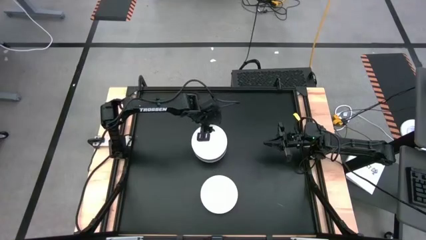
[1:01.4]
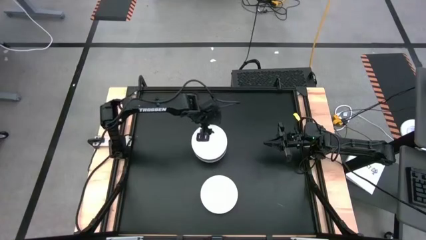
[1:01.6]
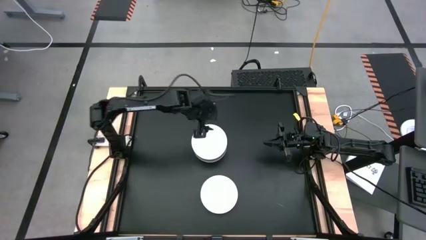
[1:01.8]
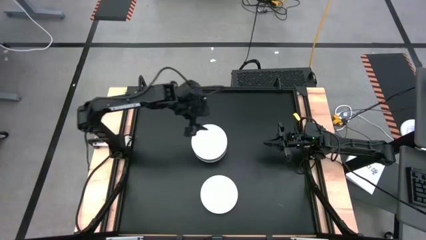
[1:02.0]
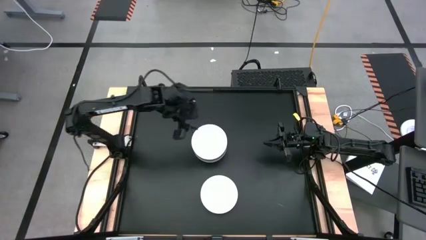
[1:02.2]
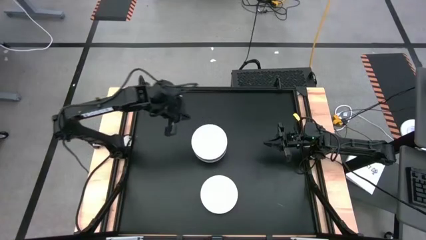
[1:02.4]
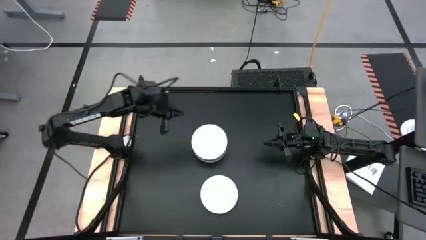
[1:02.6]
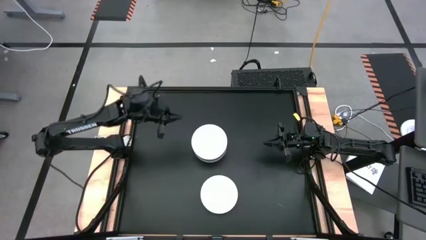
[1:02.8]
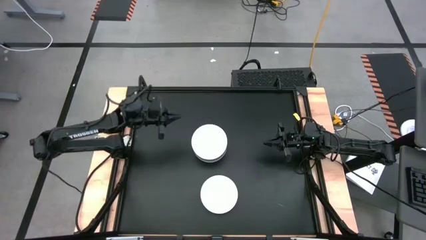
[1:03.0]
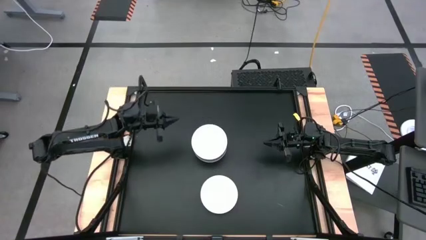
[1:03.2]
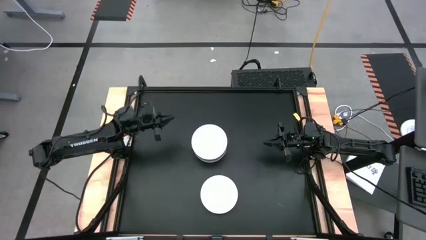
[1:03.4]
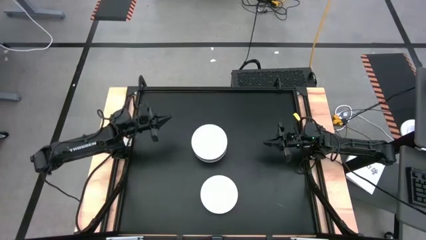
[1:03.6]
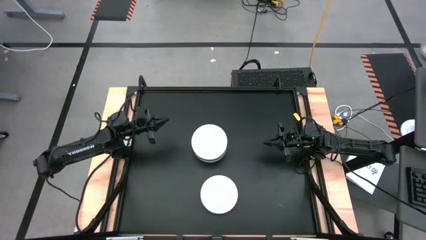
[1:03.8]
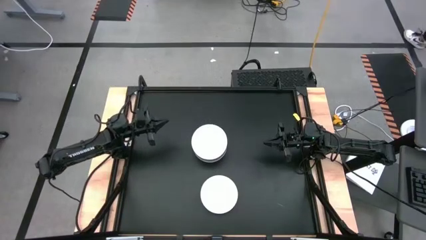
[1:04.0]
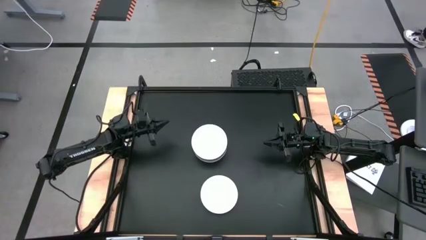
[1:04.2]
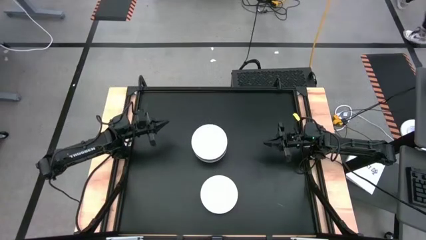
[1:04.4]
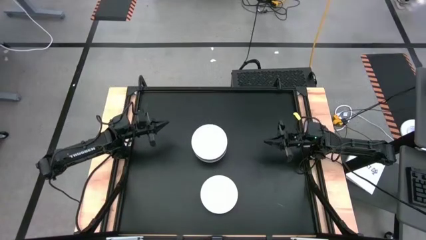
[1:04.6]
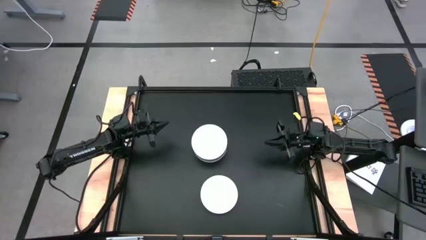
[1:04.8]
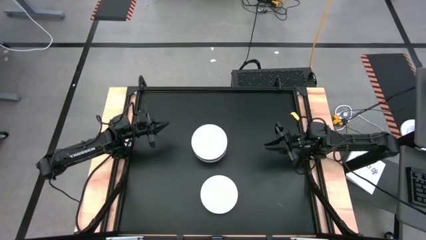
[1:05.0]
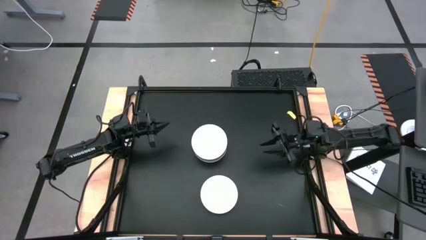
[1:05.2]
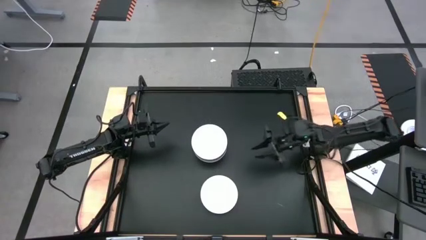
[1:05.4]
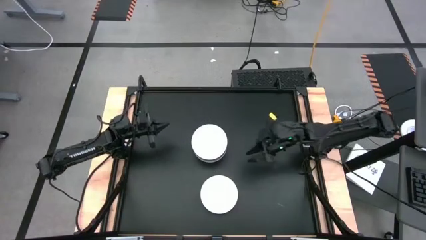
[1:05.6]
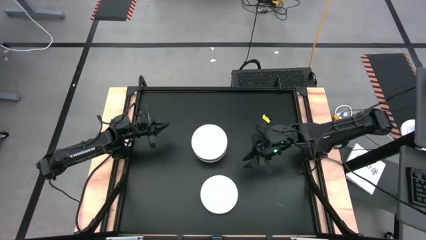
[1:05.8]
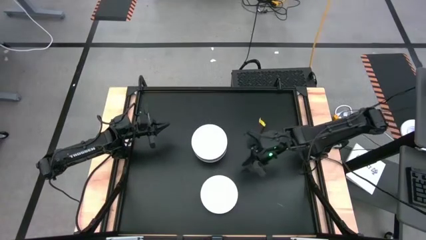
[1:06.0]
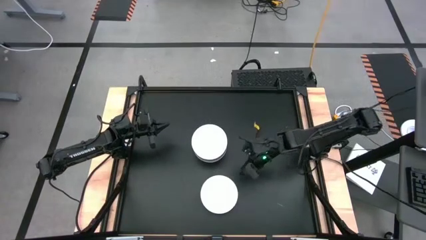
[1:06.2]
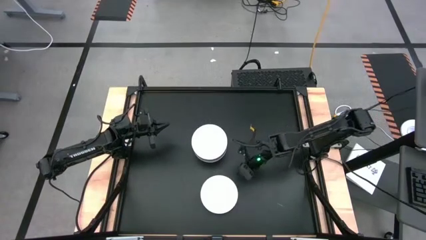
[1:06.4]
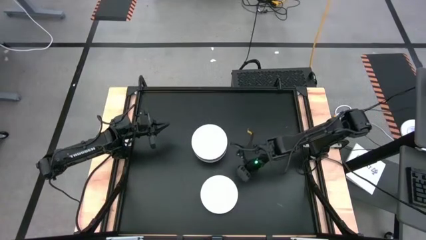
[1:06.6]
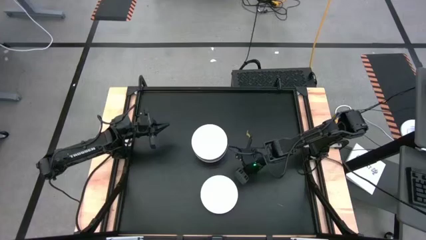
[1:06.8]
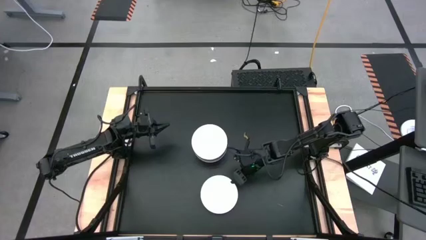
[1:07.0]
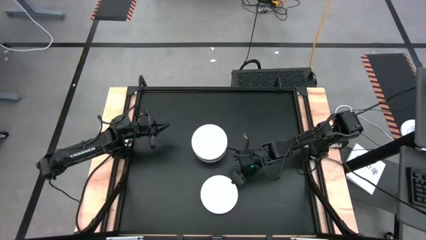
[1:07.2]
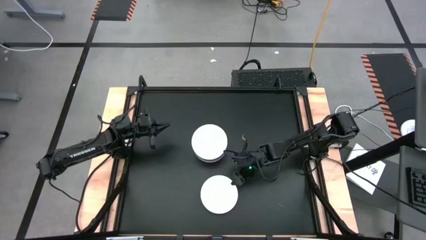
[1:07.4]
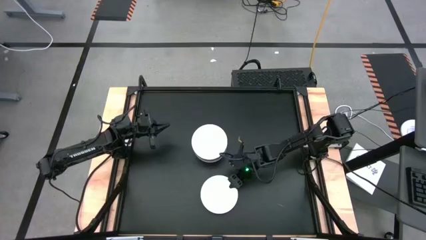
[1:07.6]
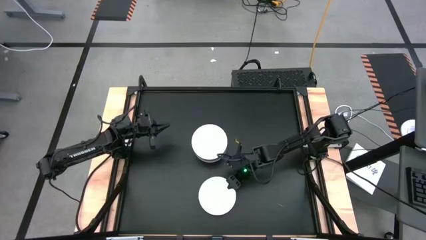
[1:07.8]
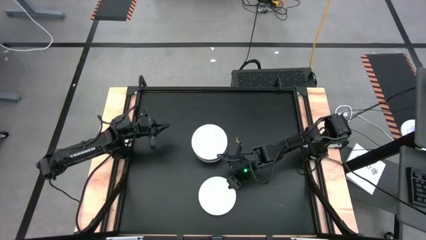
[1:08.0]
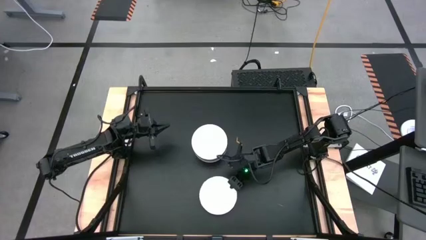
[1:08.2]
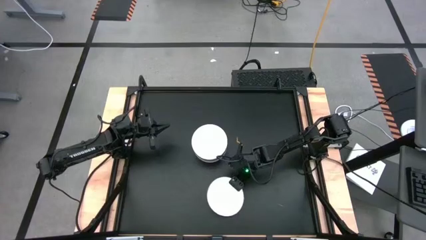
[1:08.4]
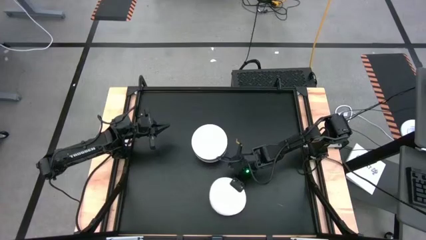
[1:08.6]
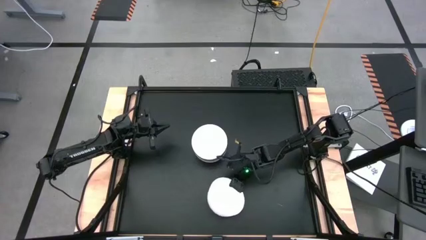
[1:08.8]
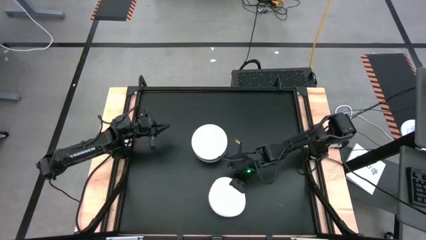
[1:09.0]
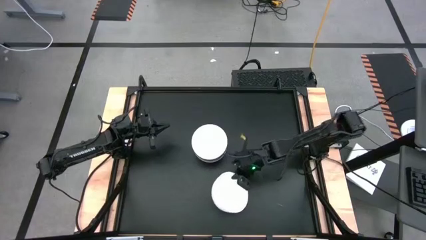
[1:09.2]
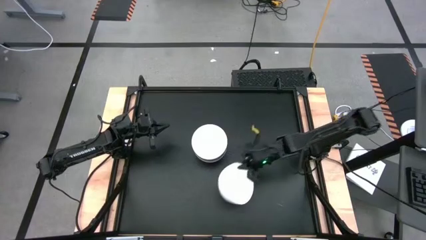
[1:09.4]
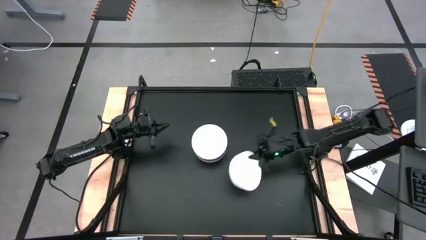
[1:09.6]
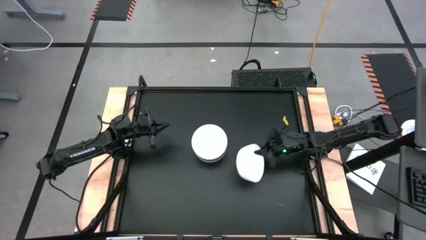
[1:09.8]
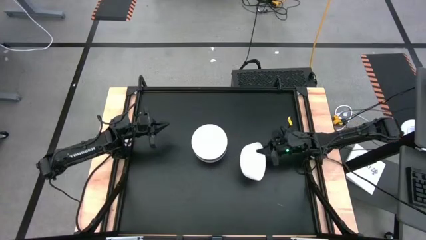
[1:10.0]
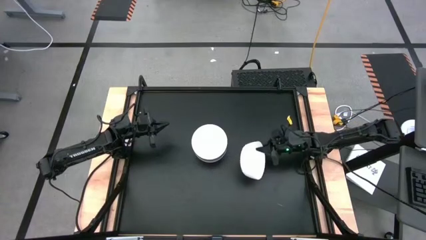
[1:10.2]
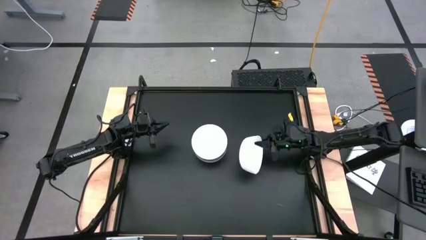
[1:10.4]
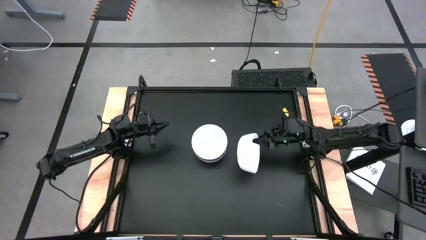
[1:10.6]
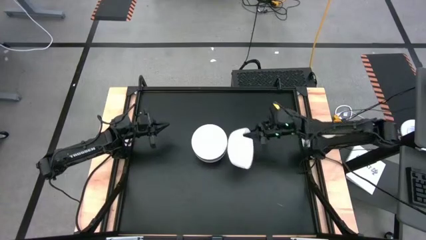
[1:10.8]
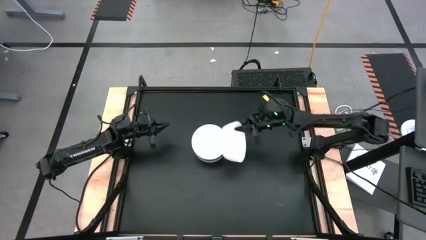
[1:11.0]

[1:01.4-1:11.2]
Task: Nest bowls inside each other
Stack the white bowl on top of the stacked white bowl

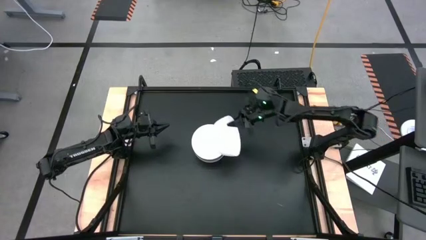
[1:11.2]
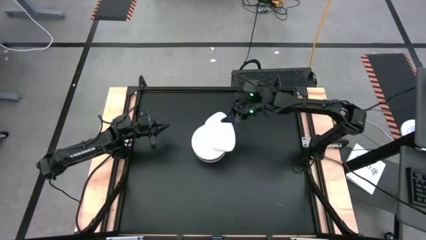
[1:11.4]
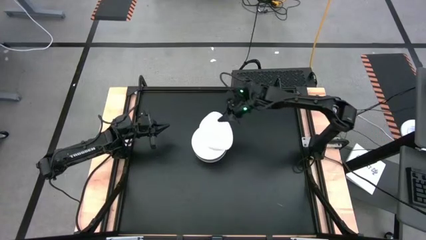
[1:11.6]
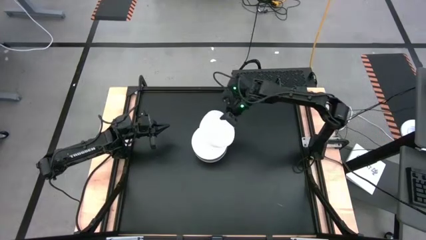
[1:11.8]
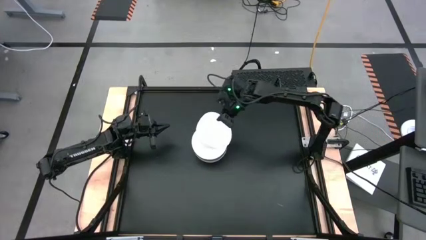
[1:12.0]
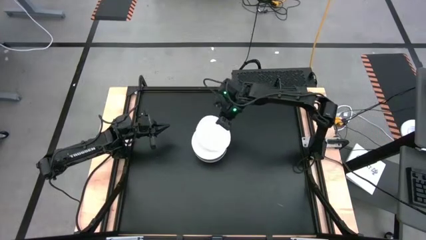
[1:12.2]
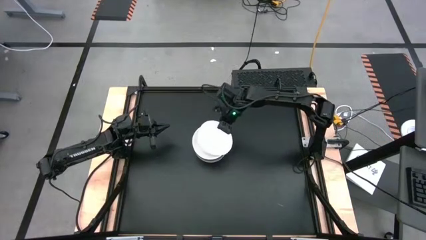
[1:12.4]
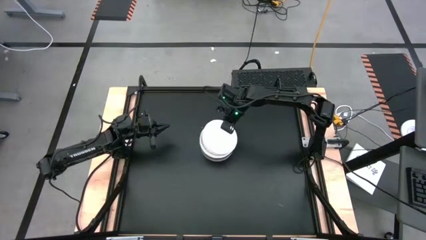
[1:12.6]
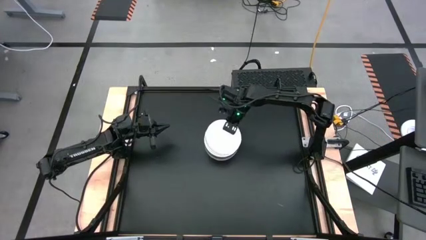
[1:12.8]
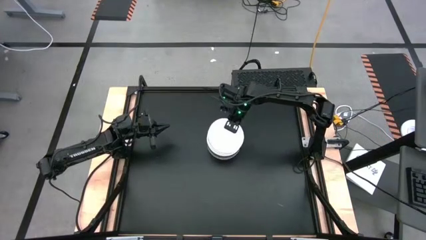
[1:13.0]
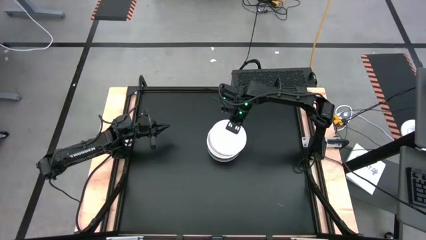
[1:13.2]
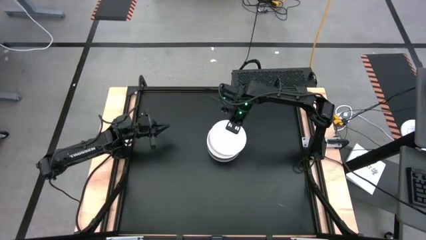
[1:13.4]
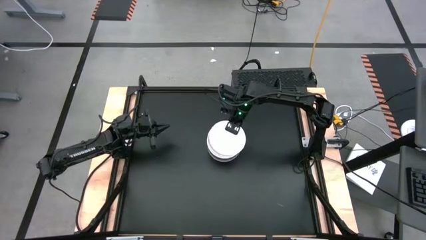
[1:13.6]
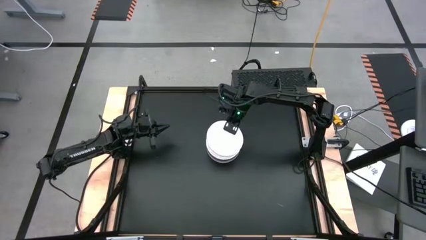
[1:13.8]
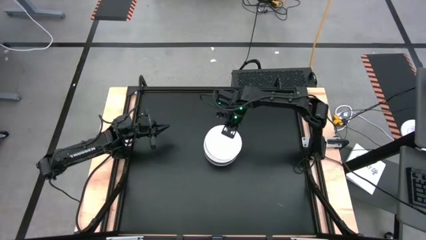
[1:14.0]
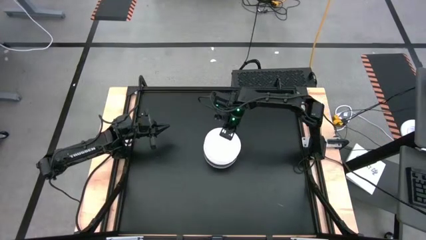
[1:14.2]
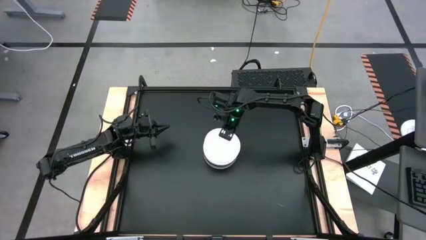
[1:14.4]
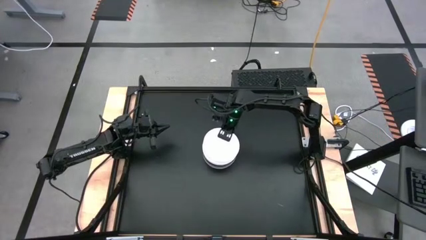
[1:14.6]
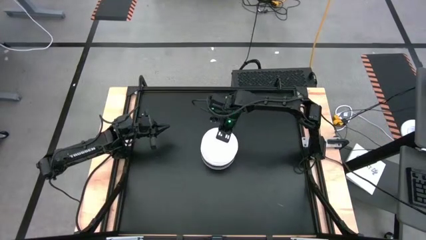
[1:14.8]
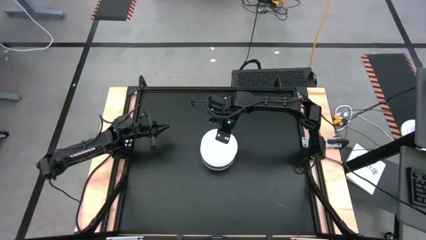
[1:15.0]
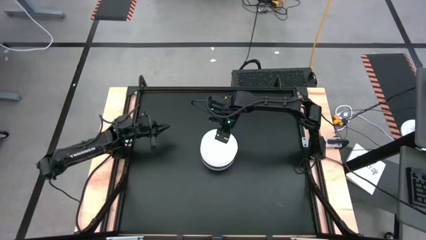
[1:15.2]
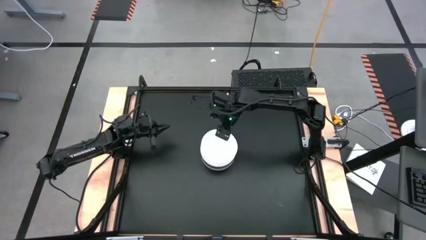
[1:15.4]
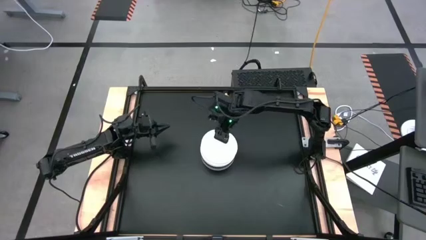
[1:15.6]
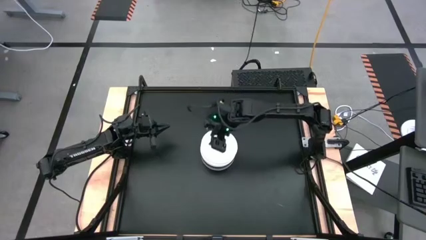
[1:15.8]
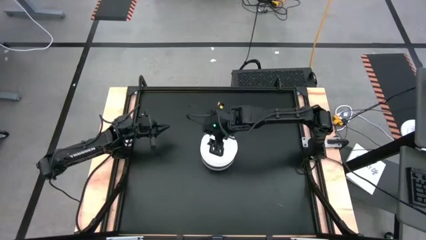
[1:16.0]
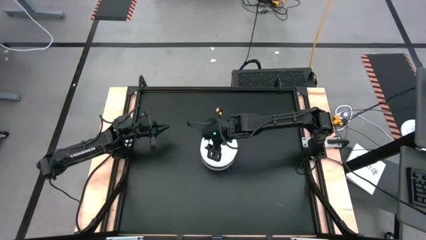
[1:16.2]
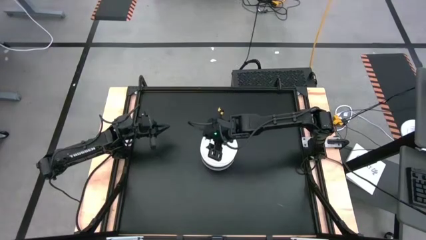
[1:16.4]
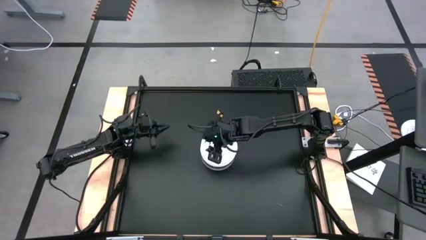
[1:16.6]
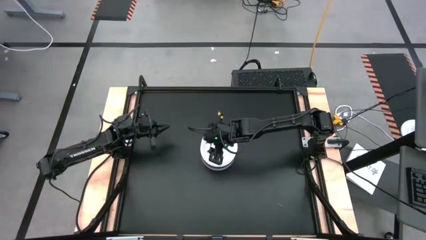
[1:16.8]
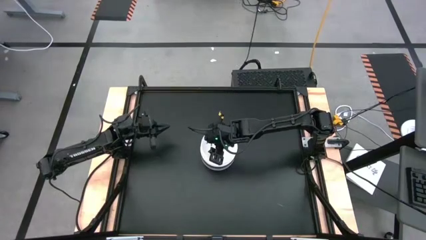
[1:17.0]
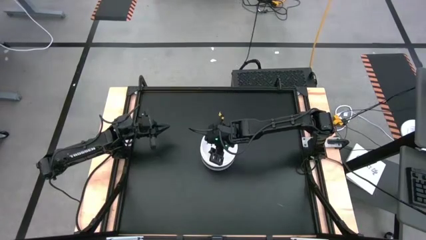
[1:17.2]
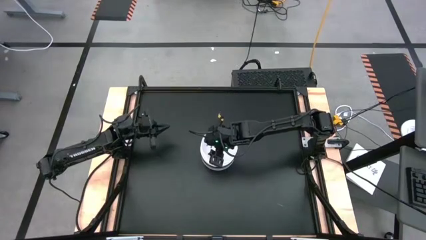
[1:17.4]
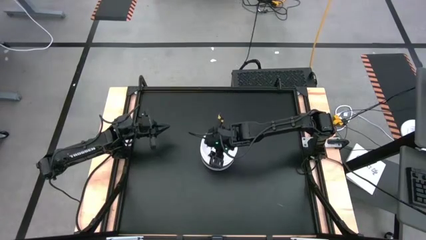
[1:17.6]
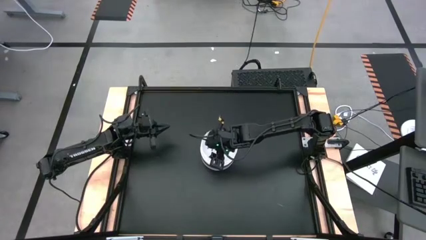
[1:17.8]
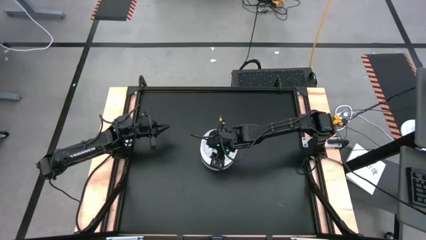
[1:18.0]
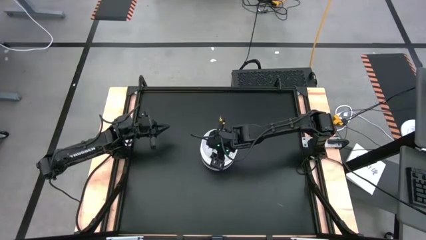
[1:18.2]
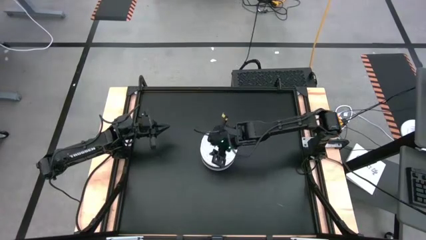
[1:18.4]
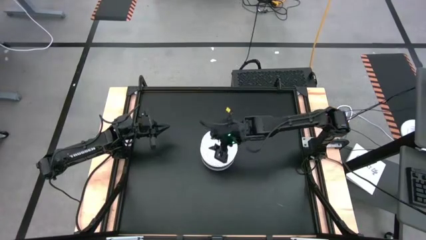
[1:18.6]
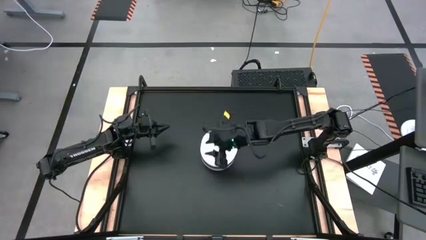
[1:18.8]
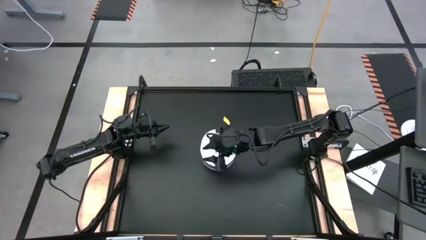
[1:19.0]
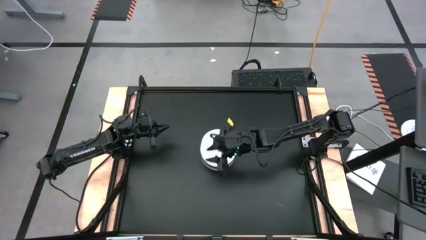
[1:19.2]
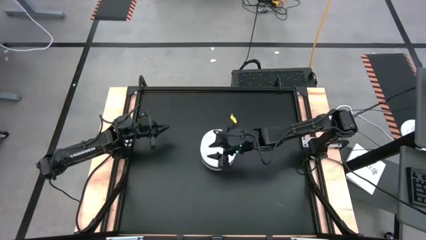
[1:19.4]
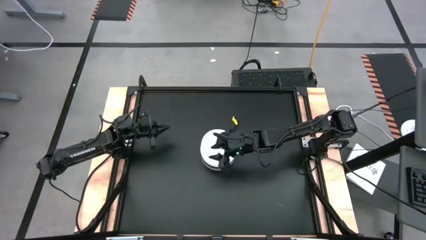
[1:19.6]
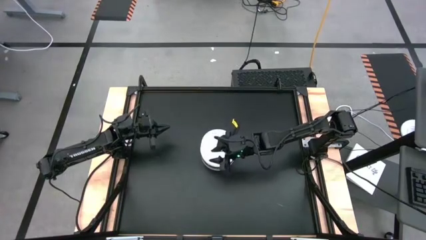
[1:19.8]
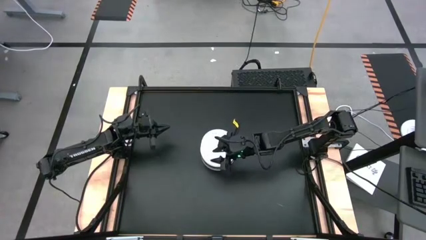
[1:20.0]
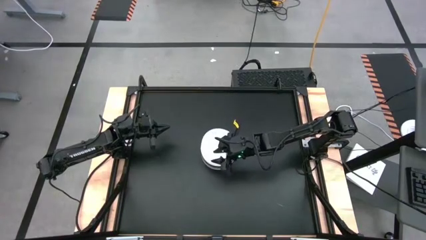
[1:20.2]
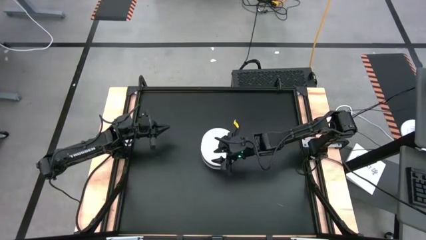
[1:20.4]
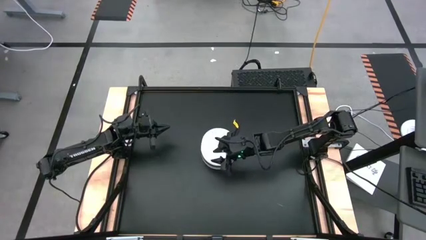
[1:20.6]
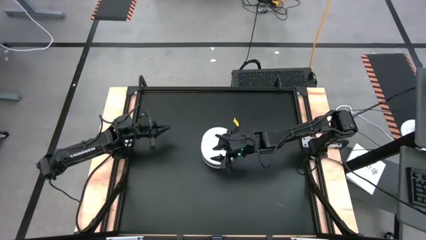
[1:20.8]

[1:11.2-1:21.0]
Stack the white bowl on top of the stacked white bowl
